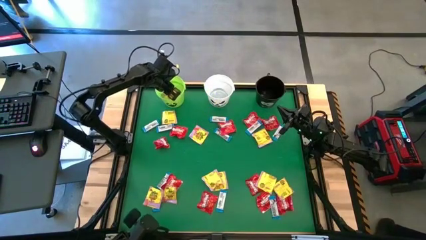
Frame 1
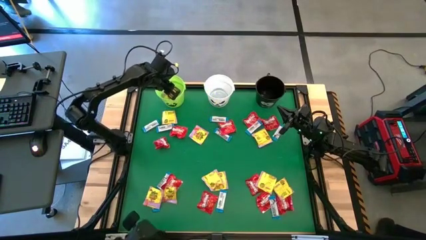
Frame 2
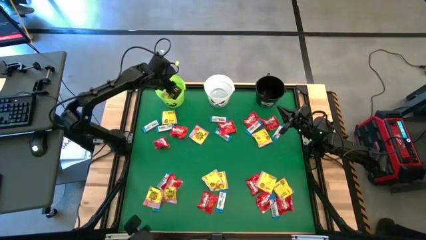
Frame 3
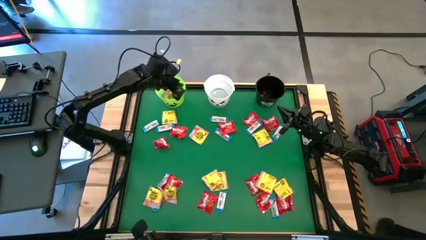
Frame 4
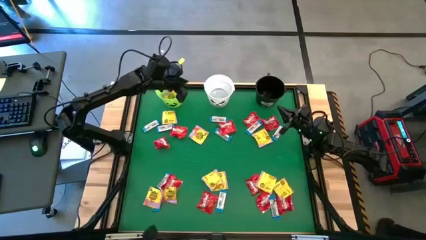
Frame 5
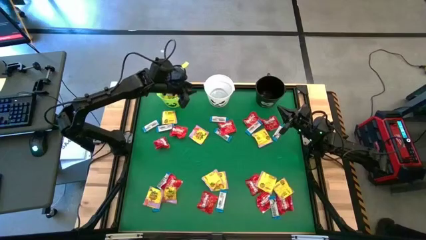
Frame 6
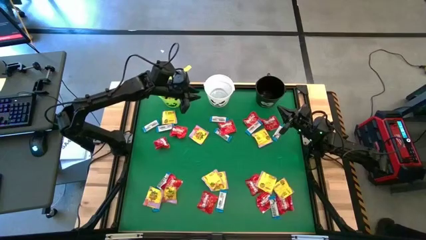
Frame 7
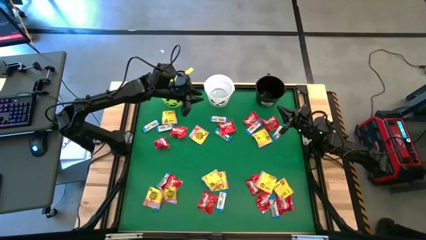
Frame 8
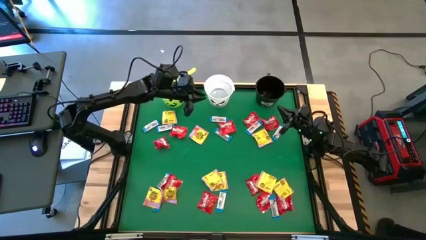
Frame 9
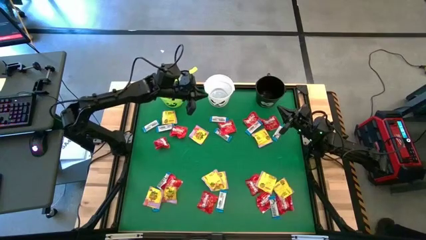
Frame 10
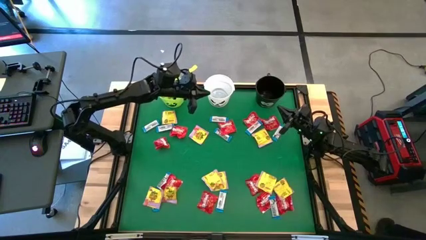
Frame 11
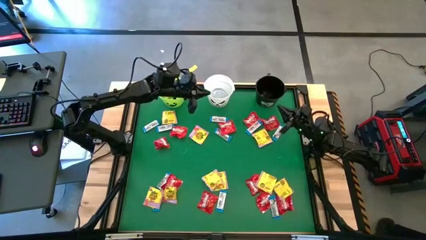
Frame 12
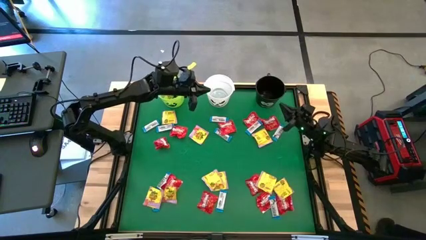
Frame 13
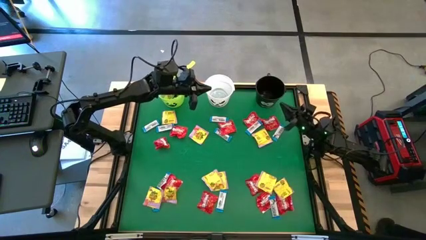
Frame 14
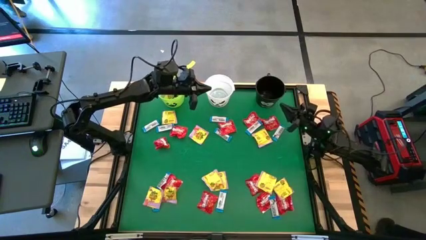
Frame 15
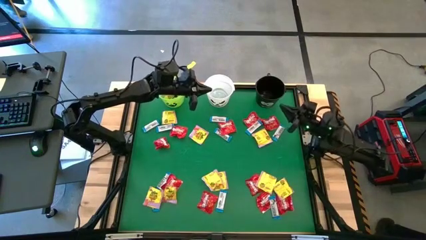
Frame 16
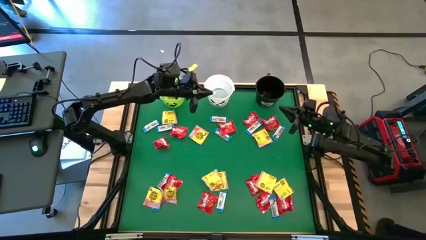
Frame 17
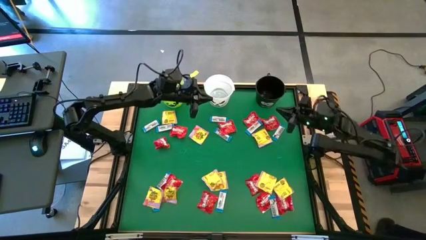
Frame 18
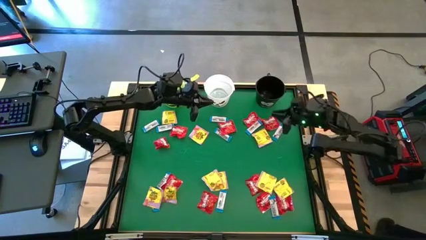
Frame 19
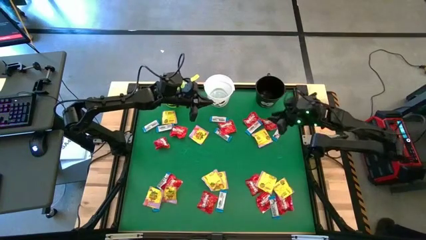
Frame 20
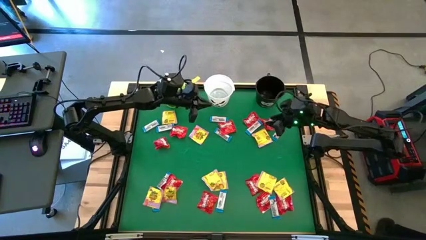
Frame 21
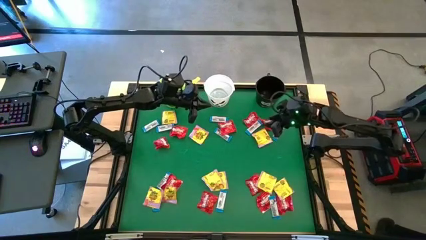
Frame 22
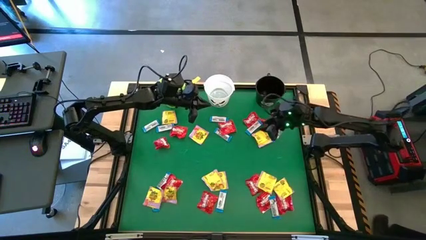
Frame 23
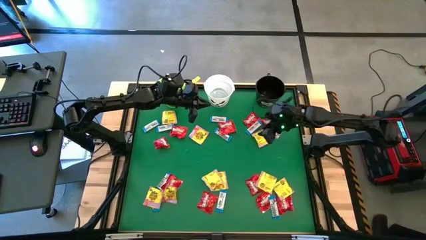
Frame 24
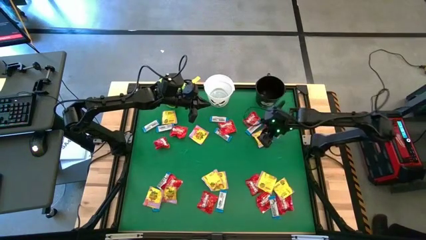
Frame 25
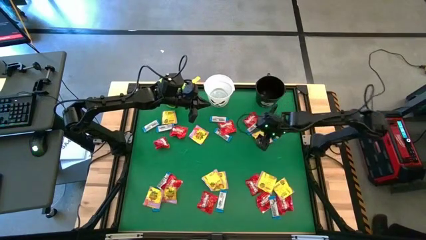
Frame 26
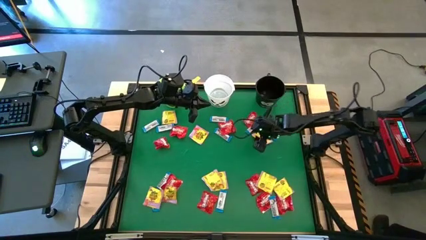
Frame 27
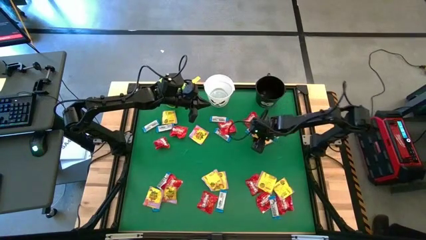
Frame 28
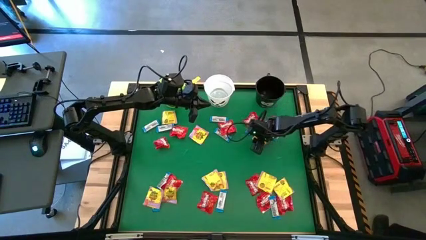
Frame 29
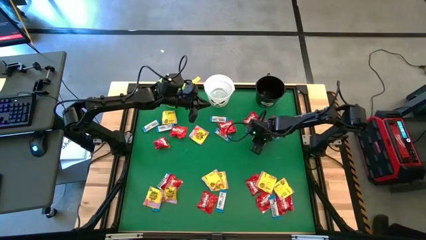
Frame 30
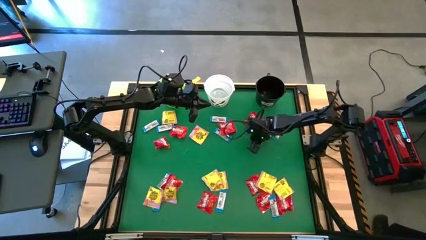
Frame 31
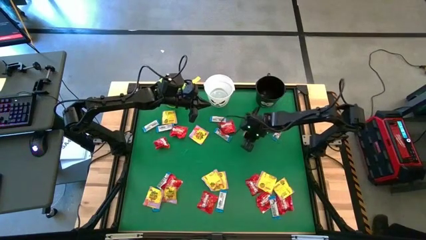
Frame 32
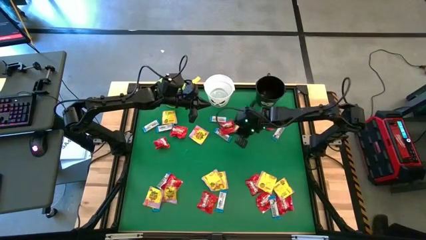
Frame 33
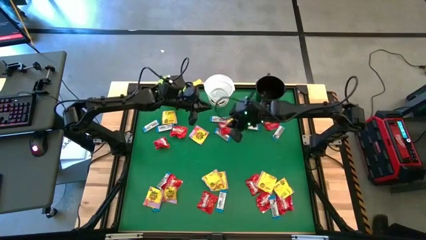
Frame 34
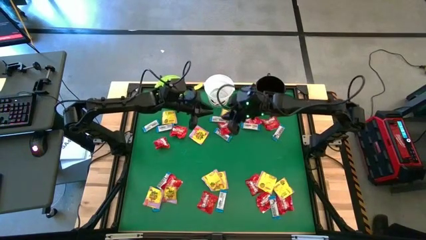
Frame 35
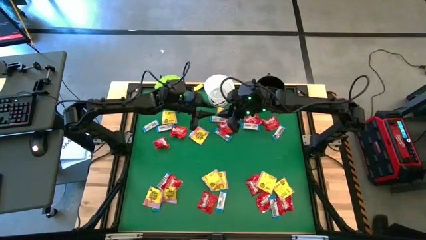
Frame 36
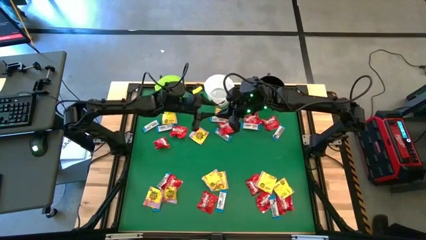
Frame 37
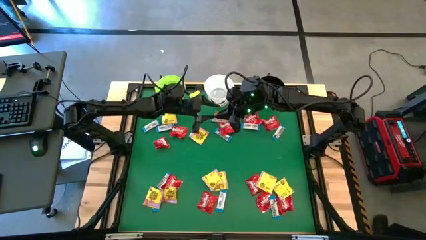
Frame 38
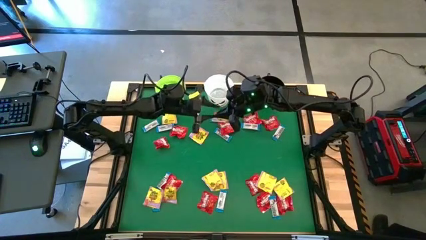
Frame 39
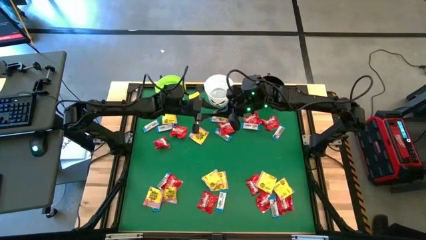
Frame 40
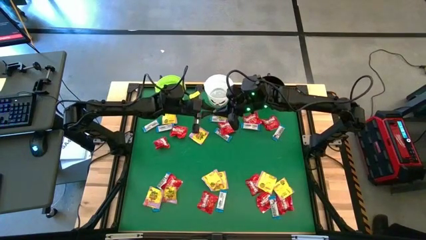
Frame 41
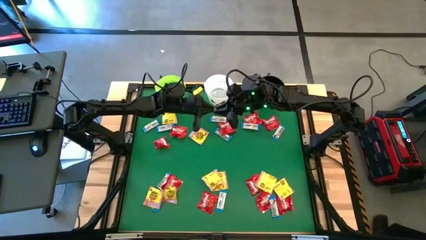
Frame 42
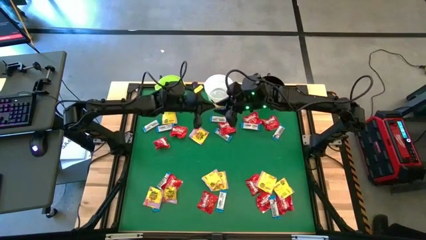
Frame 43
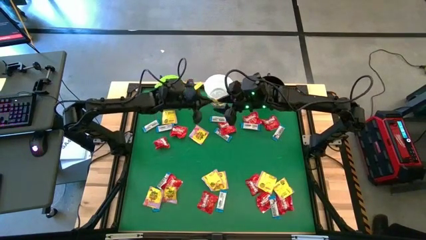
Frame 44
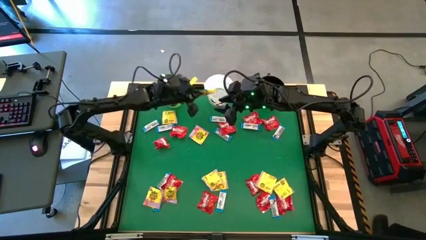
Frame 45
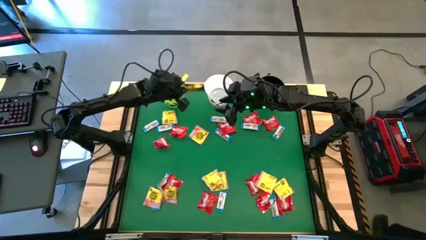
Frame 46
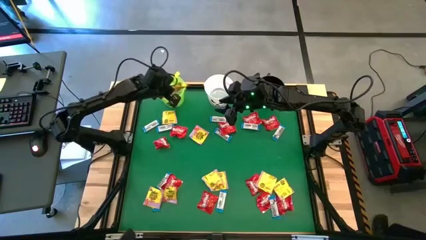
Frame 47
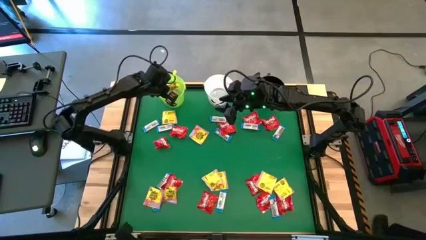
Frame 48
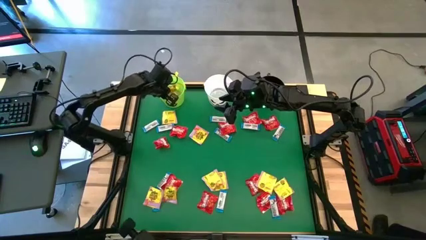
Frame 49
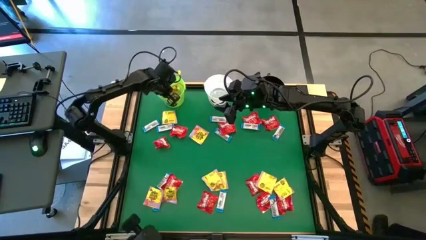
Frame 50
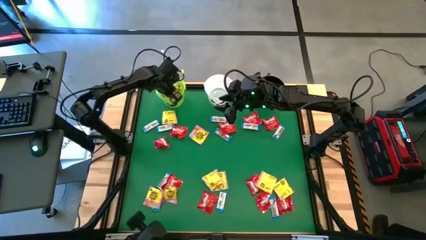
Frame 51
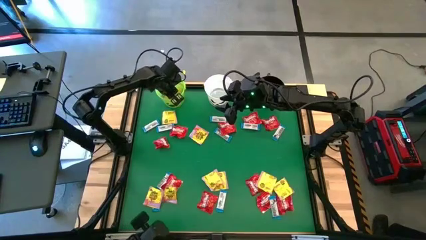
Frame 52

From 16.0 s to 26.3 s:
Task: Sort candy by brand, put in halloween buckets
Put the yellow candy into the green bucket

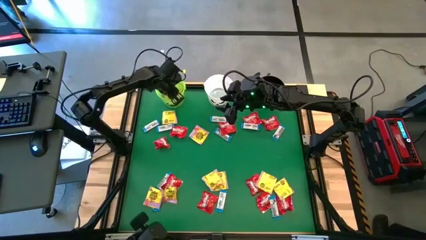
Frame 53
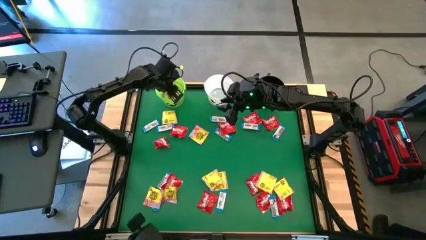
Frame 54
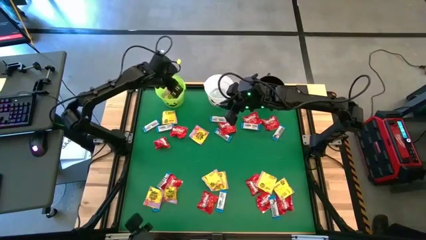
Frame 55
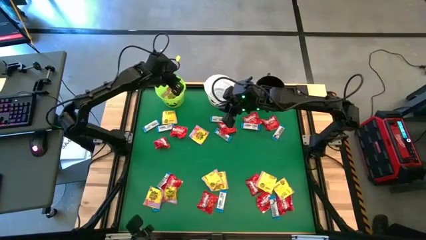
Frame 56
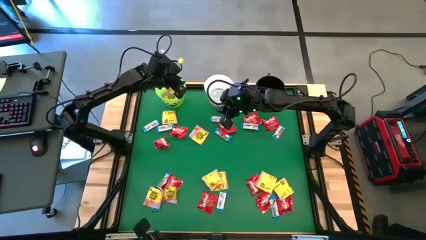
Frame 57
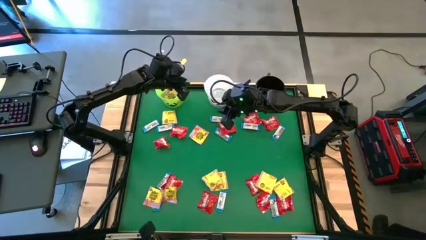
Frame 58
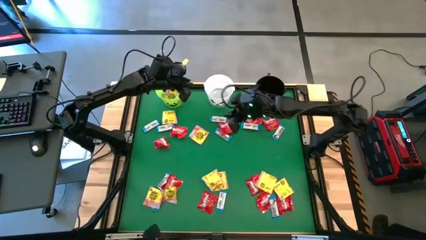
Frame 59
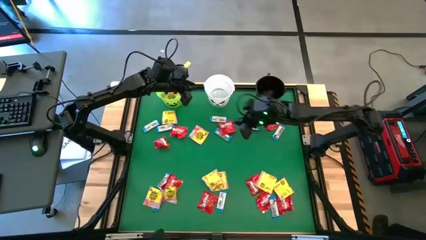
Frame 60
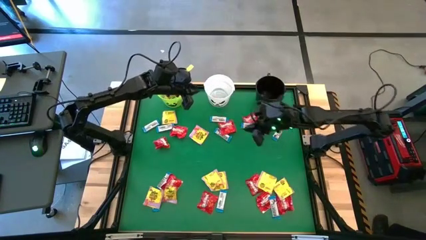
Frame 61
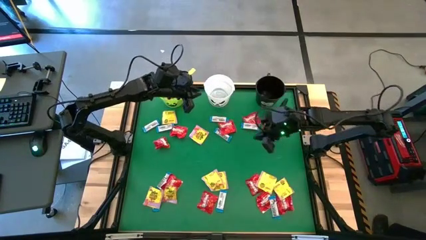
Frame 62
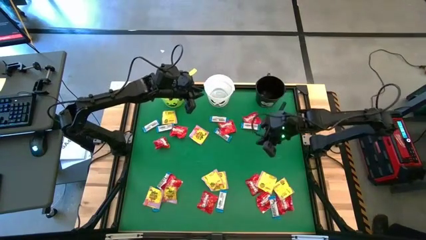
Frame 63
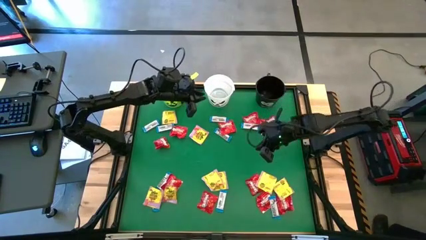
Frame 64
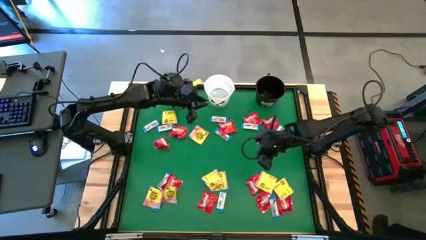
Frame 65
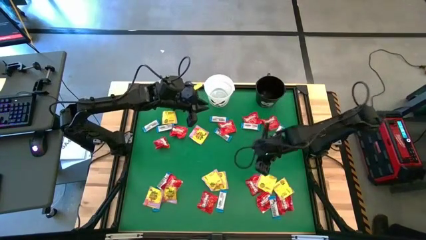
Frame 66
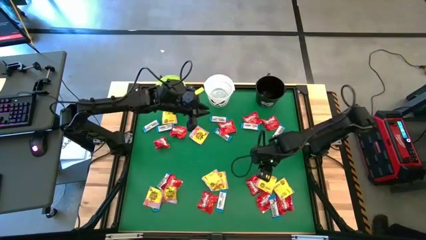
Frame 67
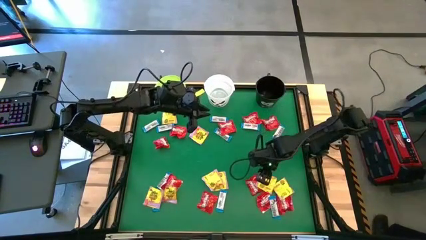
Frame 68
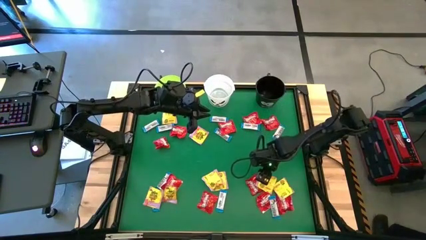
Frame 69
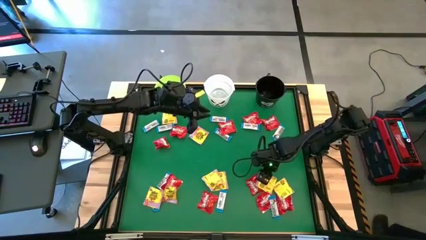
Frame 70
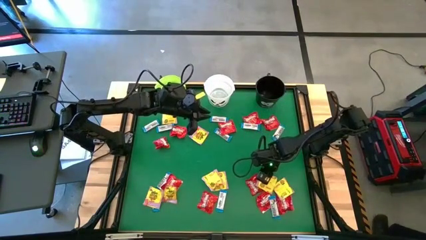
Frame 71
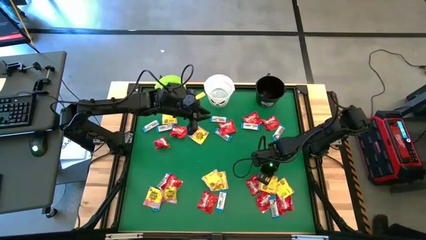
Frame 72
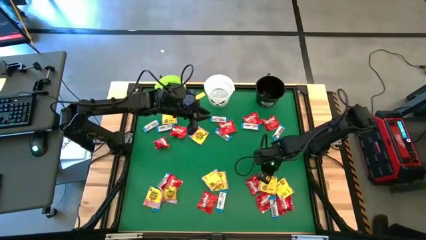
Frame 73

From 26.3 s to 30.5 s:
Put the yellow candy into the green bucket
